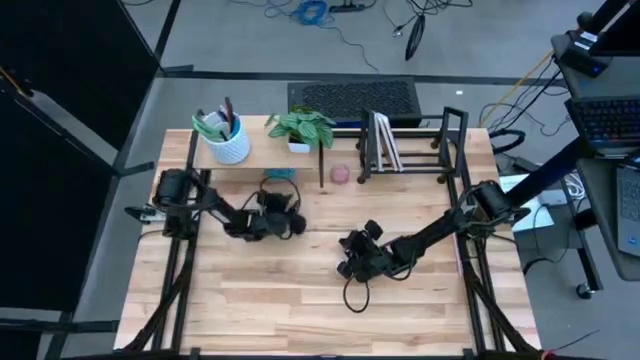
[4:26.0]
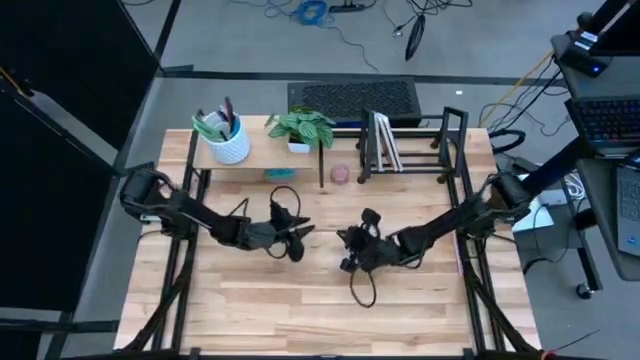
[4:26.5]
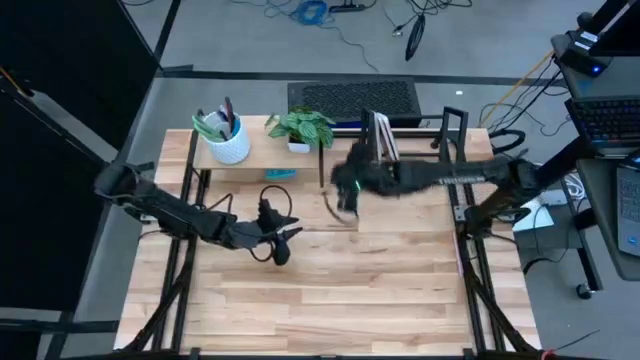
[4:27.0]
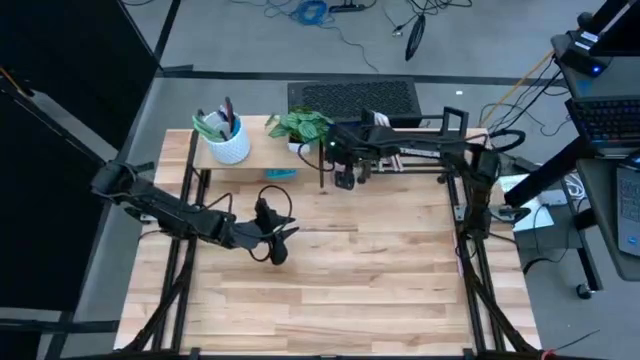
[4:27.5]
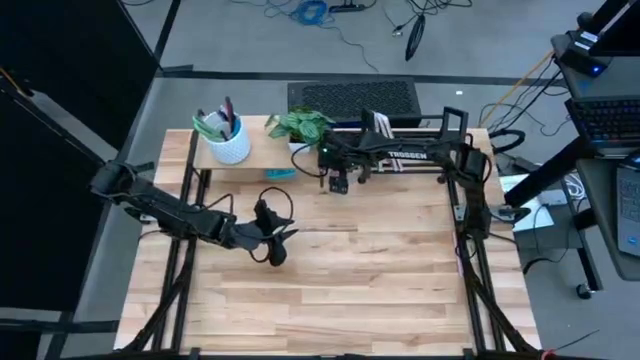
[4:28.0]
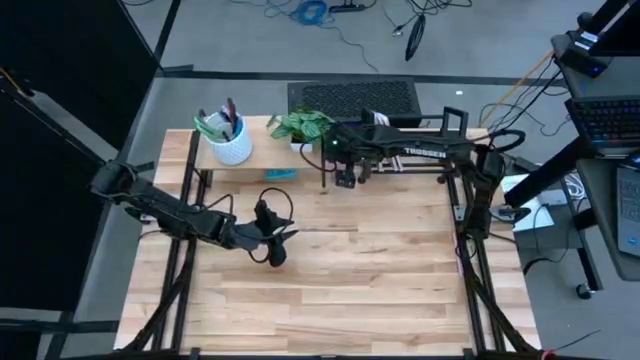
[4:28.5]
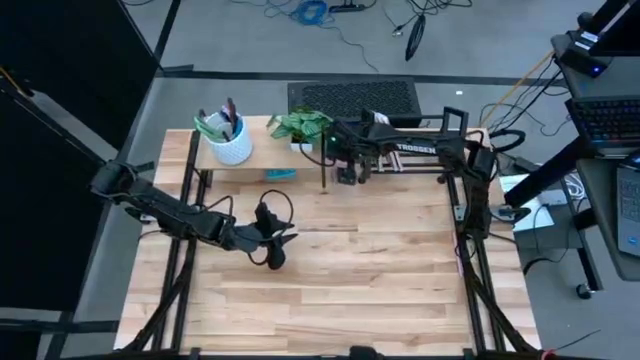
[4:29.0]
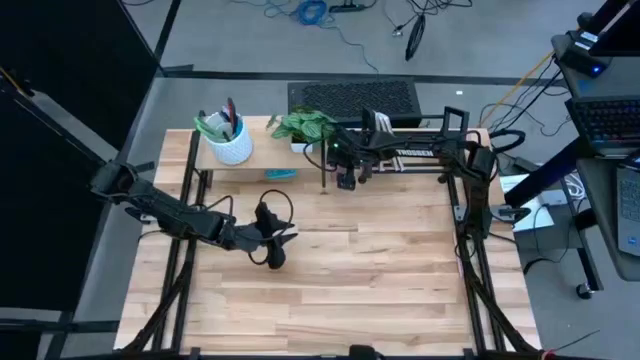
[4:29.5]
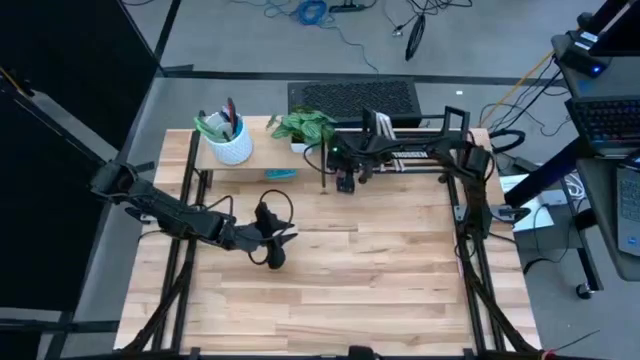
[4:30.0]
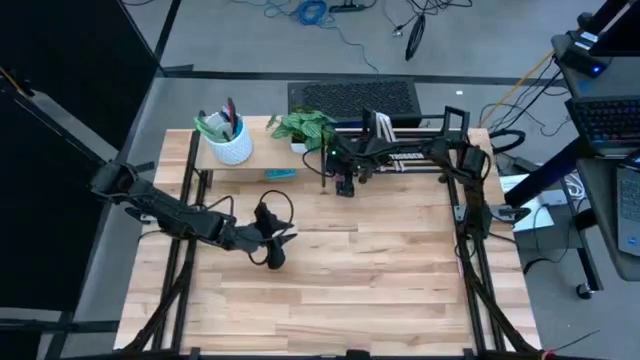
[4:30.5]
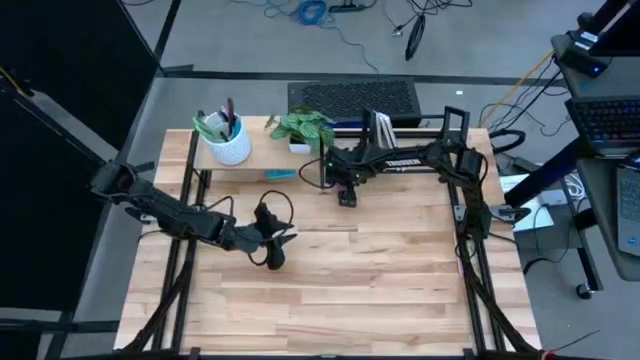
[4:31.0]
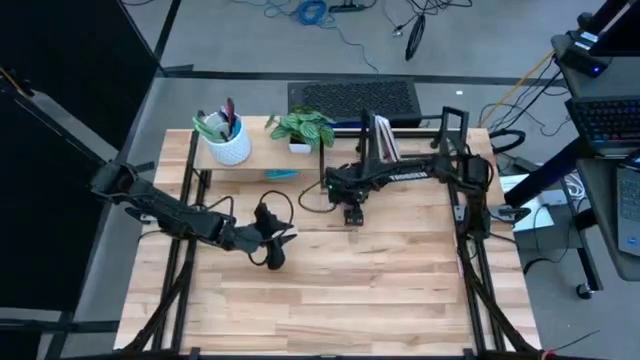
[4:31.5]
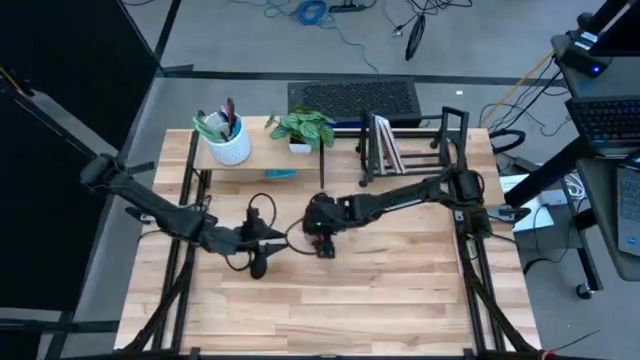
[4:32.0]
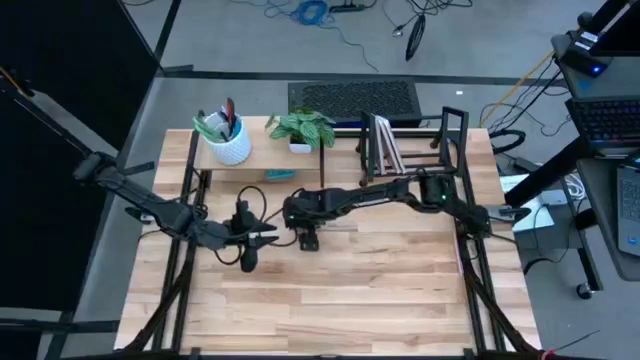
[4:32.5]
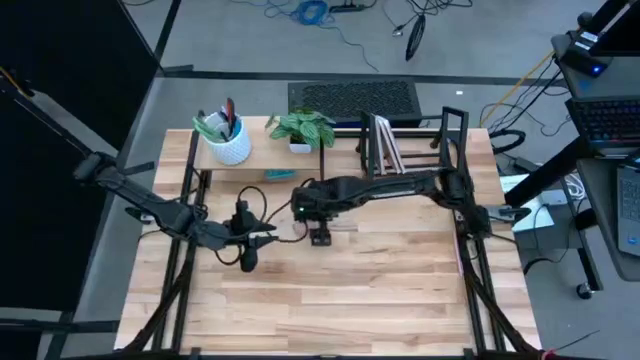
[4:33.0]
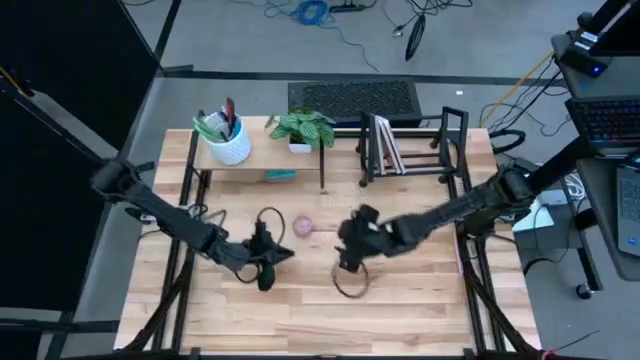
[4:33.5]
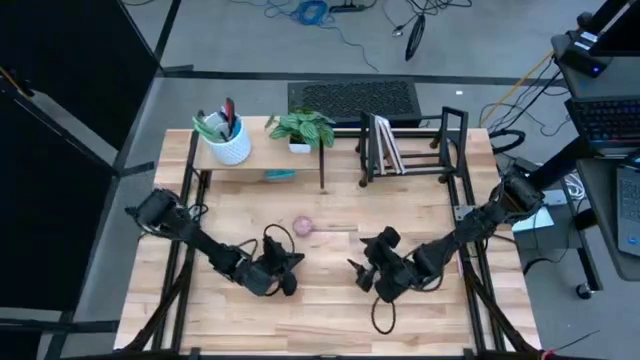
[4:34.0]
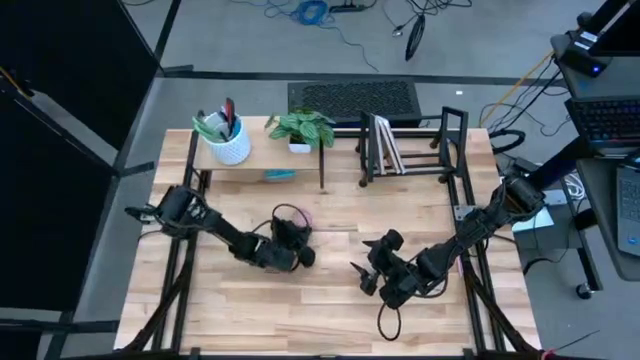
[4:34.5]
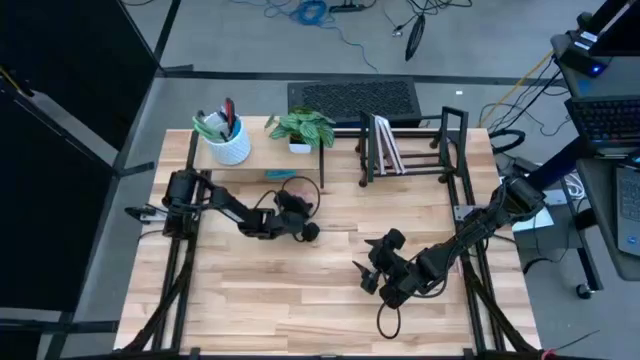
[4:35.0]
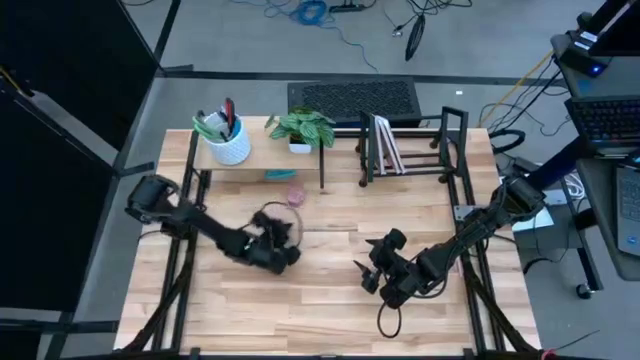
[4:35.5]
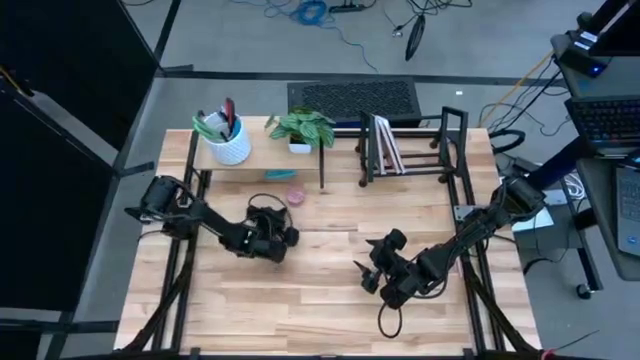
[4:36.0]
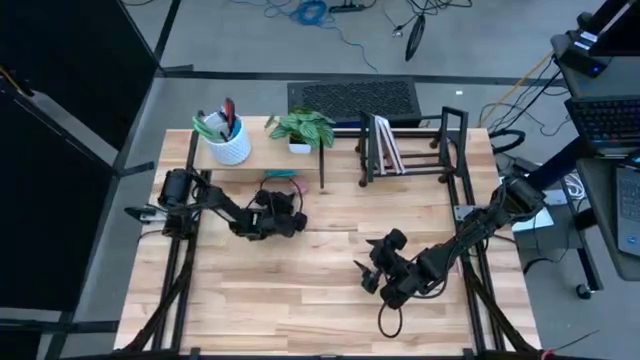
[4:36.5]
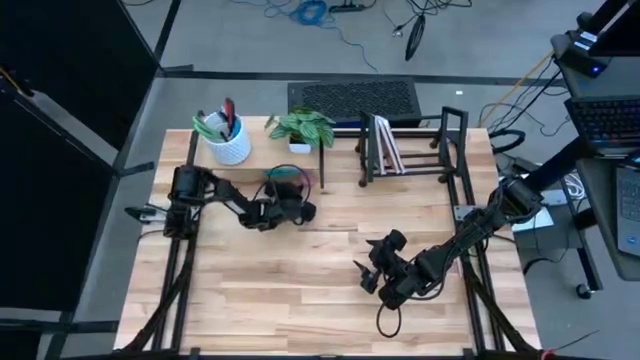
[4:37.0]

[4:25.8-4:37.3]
Task: Stock shelves
Put the red scented candle under the shelf

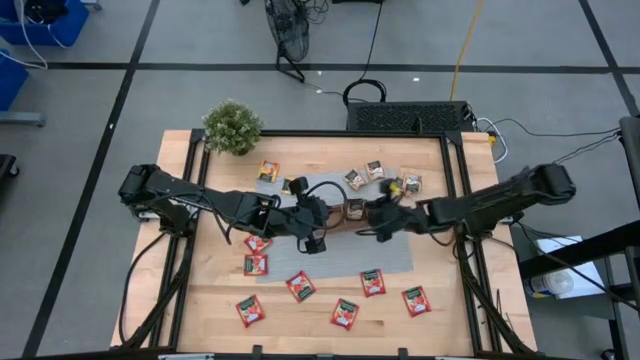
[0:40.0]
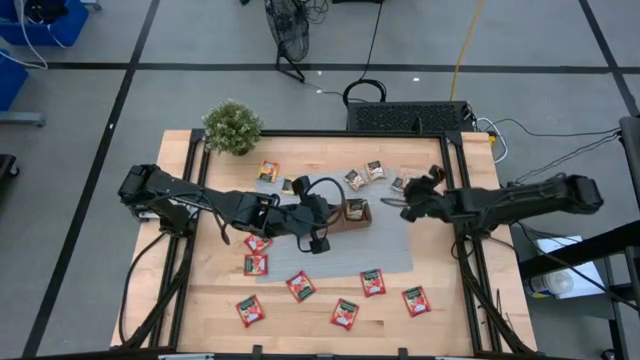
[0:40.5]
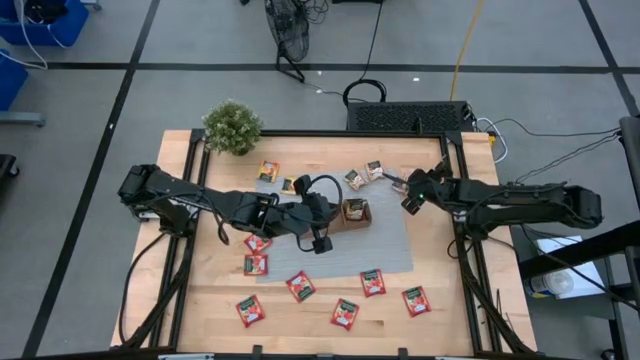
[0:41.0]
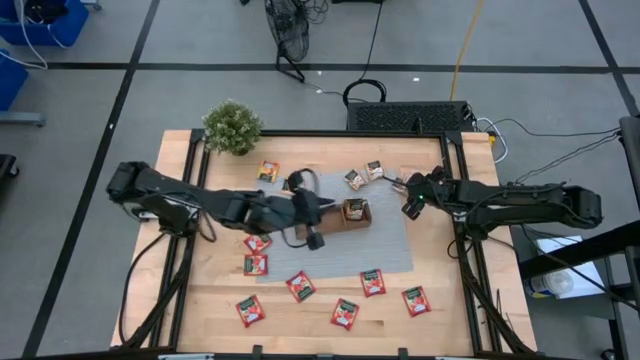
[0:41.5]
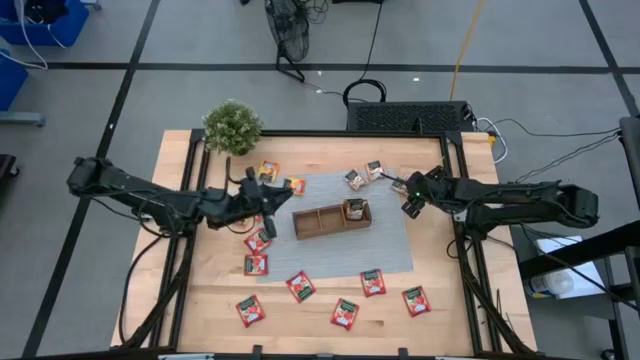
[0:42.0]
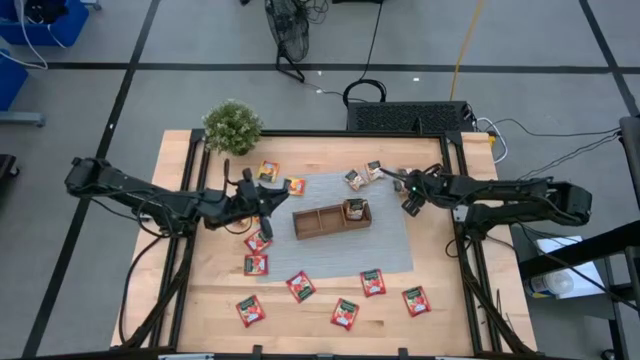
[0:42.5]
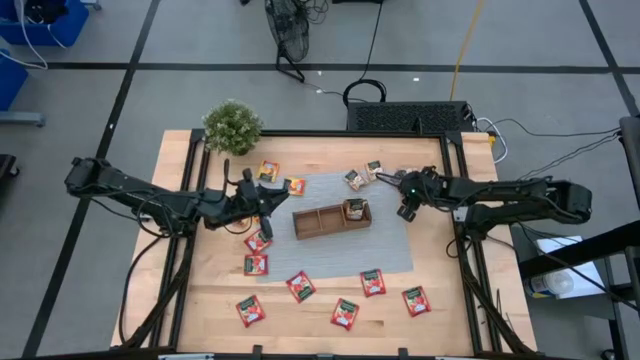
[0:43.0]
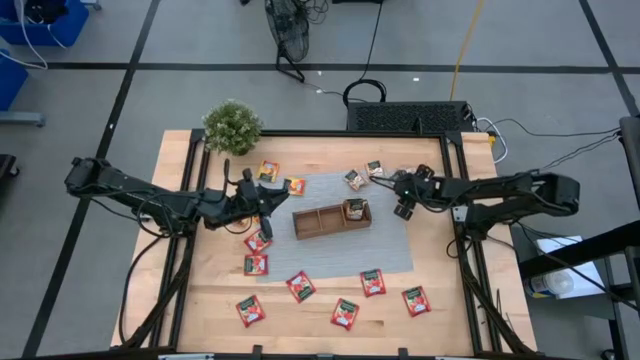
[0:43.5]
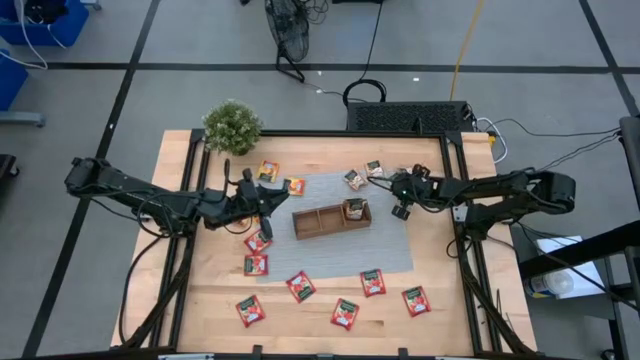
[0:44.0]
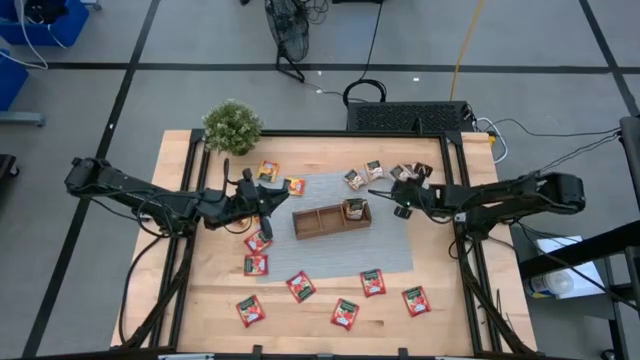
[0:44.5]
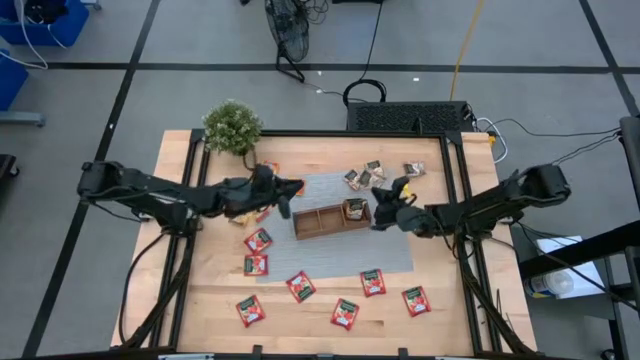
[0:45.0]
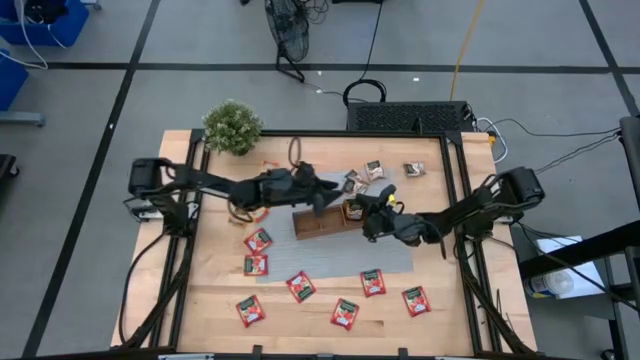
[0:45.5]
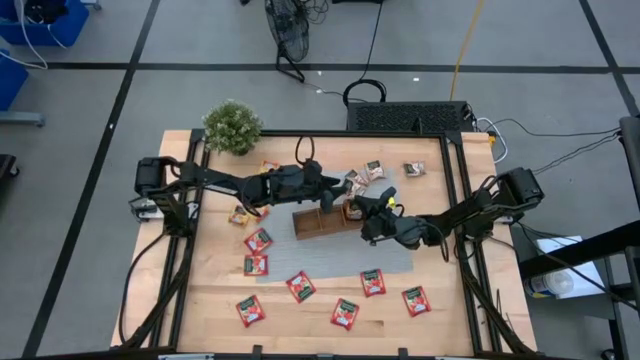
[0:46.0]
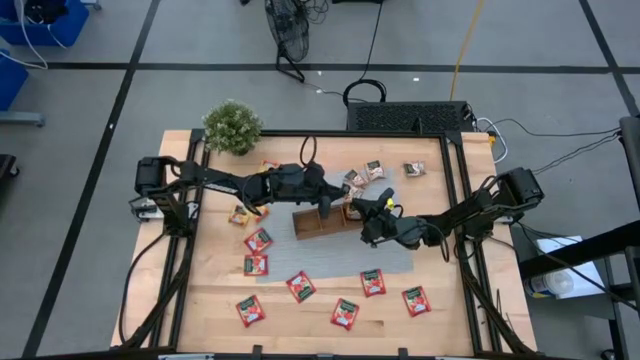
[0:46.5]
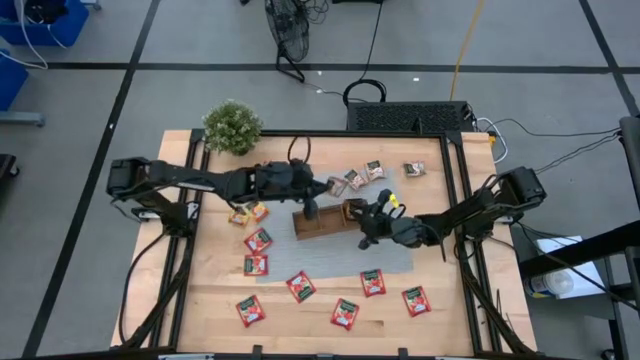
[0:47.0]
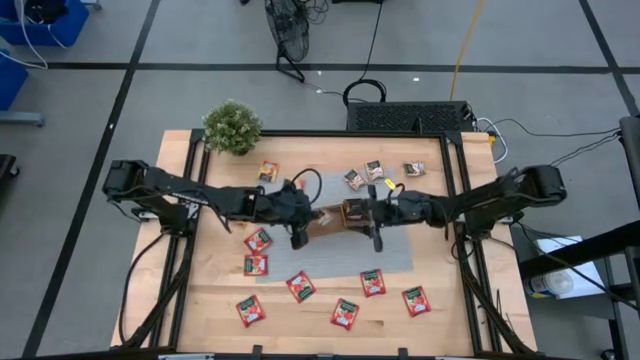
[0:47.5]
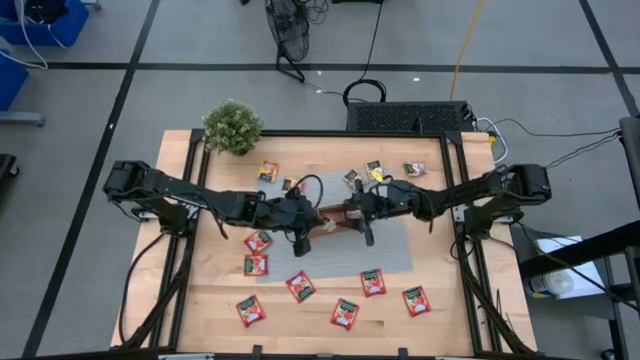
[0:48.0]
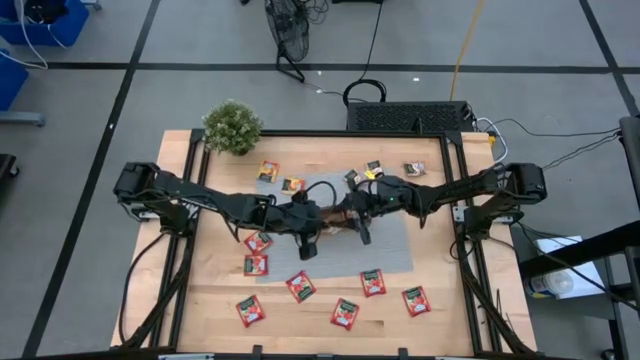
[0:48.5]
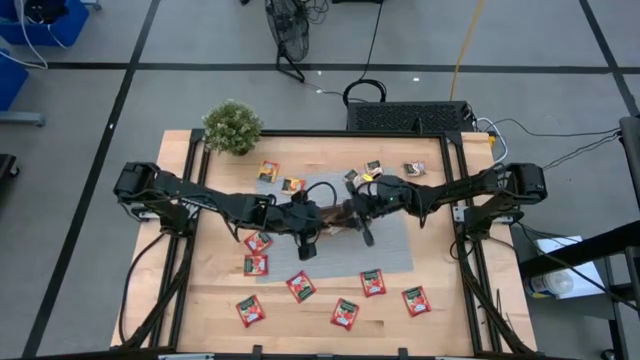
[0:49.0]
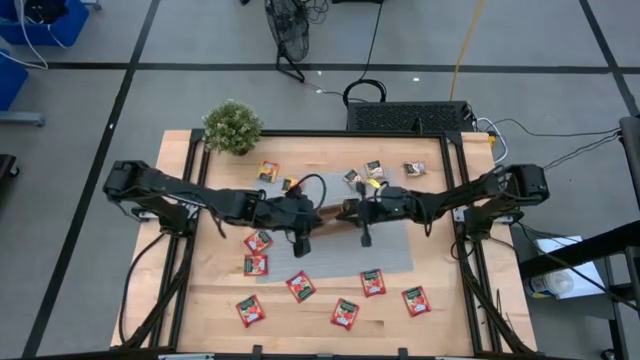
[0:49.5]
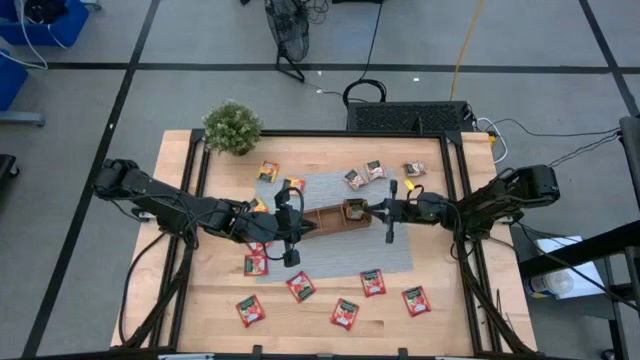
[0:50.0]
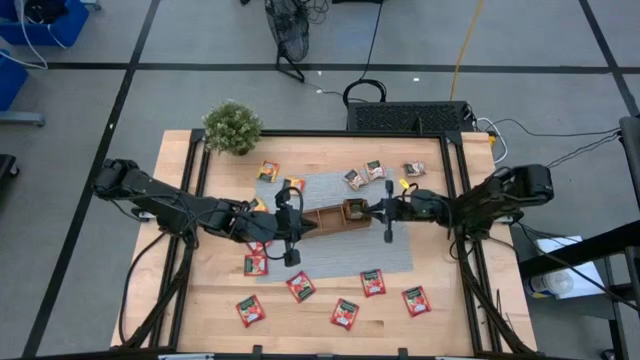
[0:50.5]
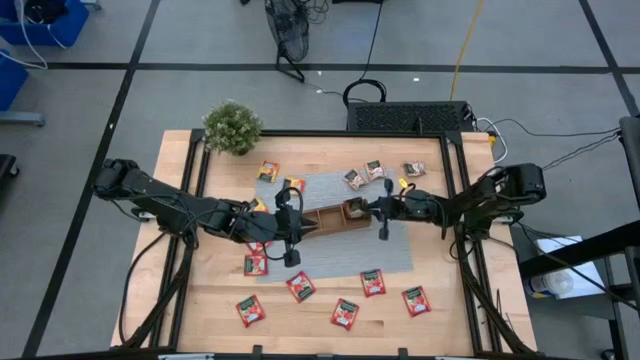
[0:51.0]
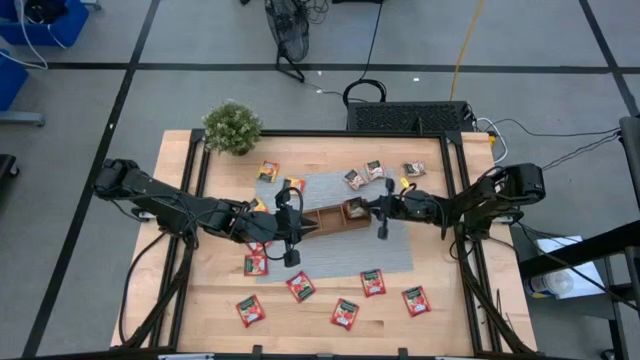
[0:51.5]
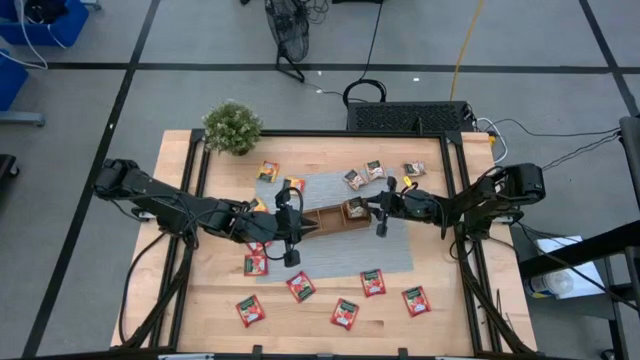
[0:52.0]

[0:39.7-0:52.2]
Task: Pick & Place Tea
Put the brown tea bag into the right section of the wooden organizer
